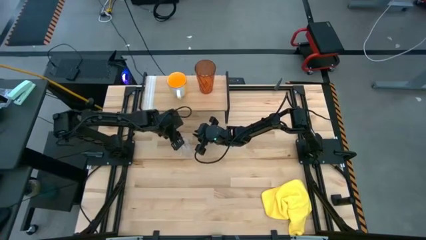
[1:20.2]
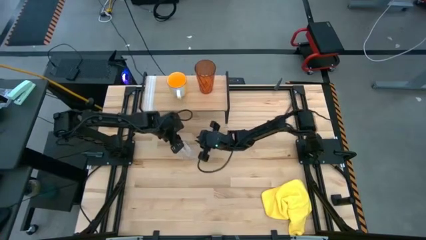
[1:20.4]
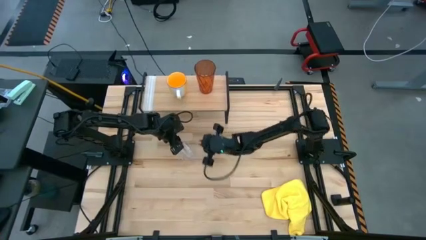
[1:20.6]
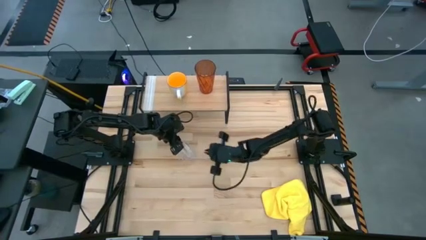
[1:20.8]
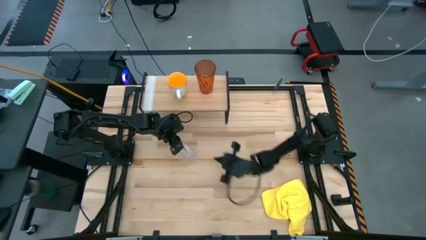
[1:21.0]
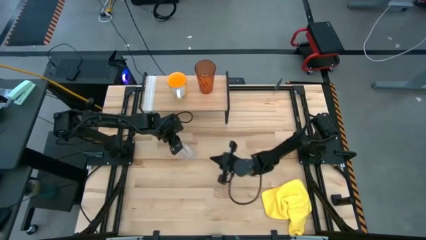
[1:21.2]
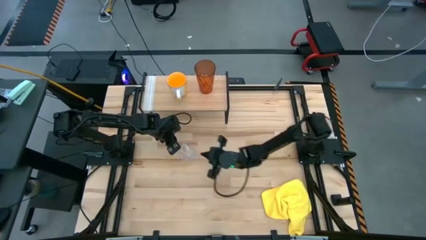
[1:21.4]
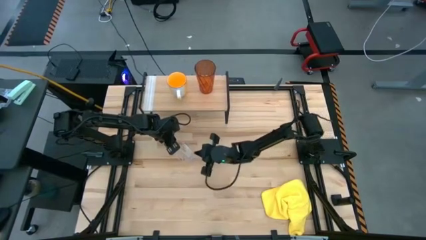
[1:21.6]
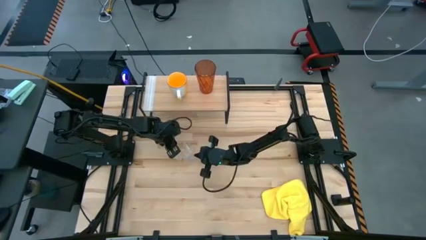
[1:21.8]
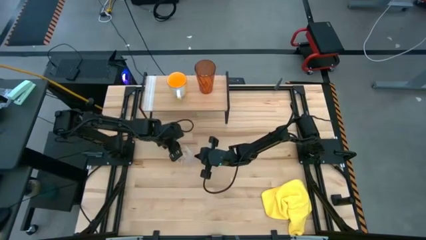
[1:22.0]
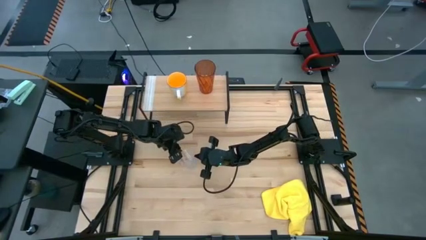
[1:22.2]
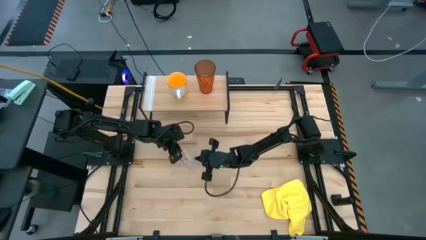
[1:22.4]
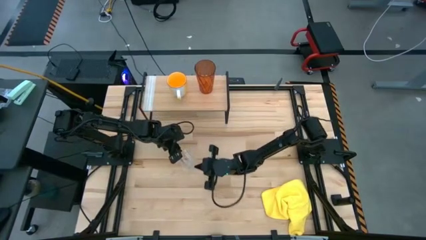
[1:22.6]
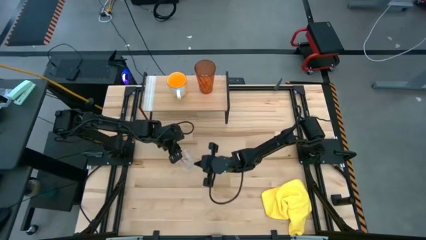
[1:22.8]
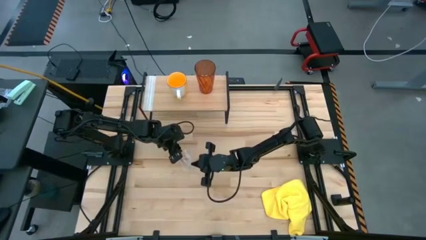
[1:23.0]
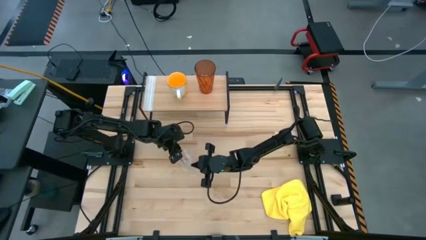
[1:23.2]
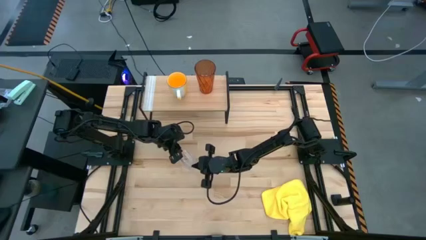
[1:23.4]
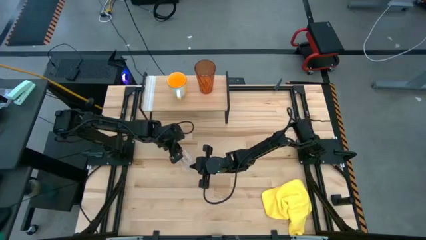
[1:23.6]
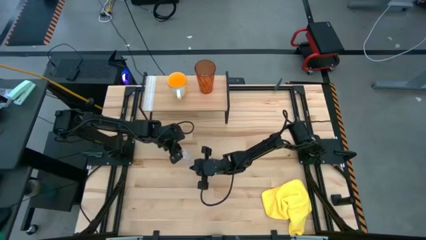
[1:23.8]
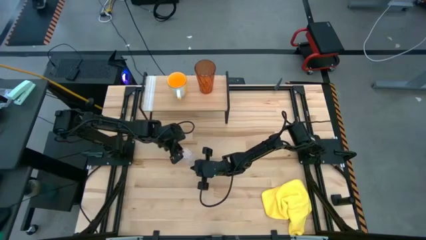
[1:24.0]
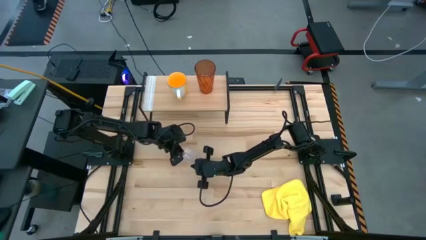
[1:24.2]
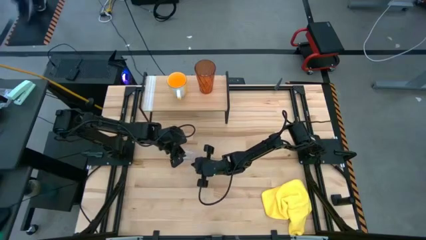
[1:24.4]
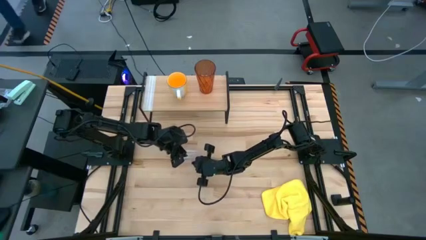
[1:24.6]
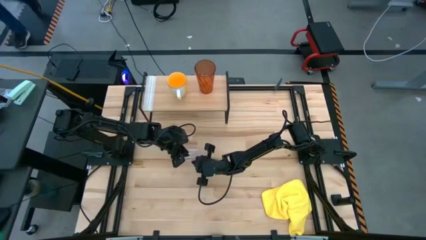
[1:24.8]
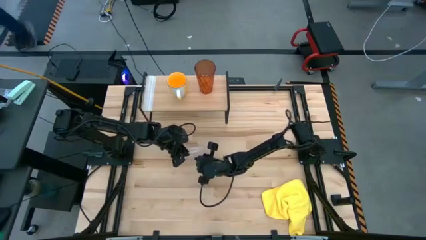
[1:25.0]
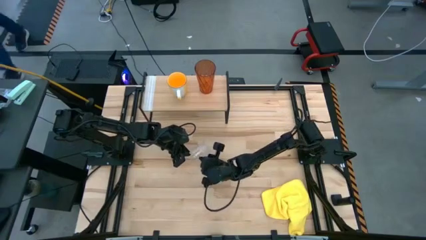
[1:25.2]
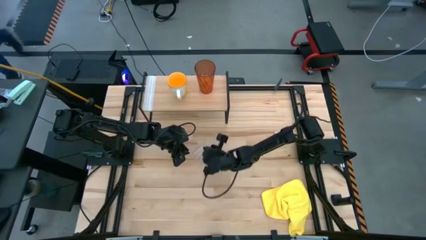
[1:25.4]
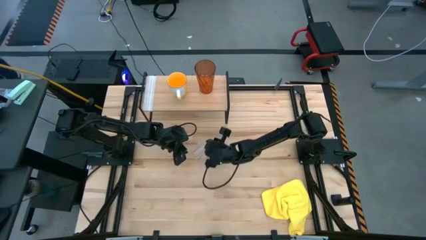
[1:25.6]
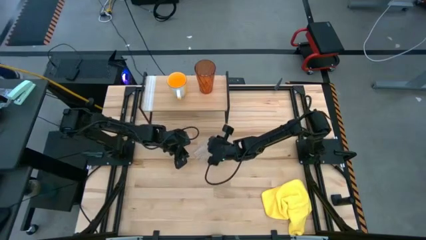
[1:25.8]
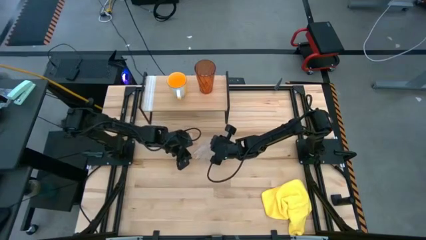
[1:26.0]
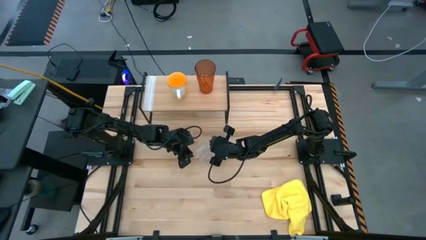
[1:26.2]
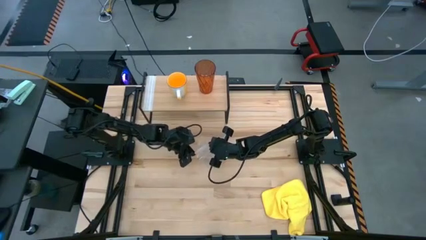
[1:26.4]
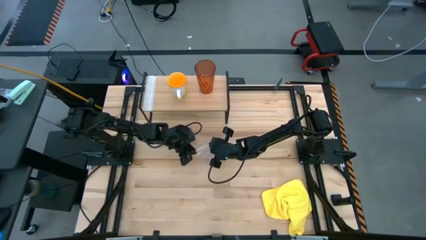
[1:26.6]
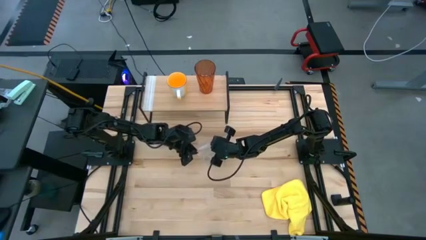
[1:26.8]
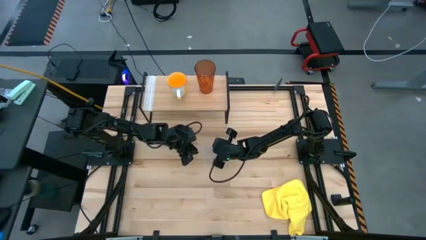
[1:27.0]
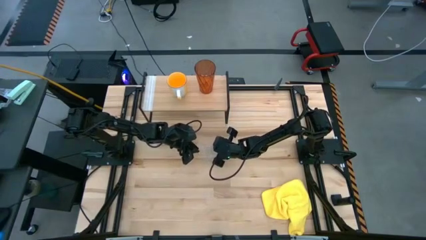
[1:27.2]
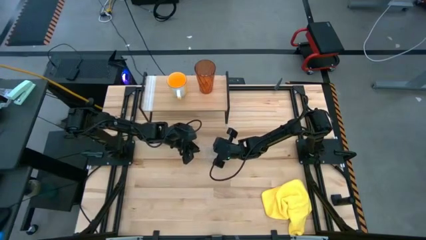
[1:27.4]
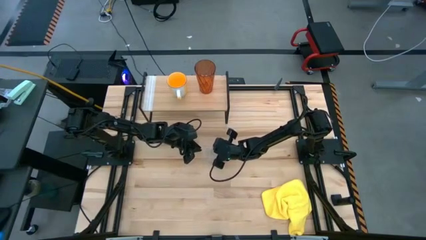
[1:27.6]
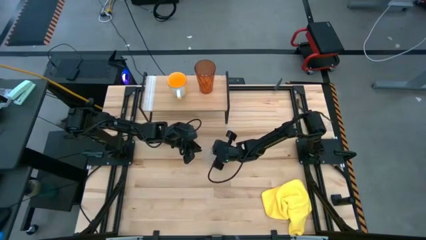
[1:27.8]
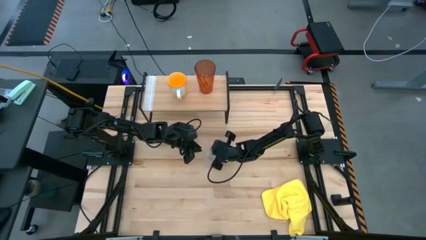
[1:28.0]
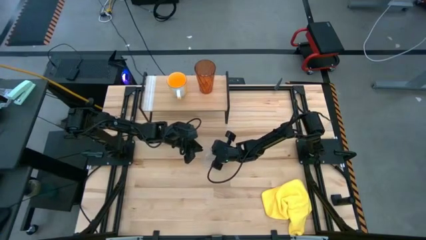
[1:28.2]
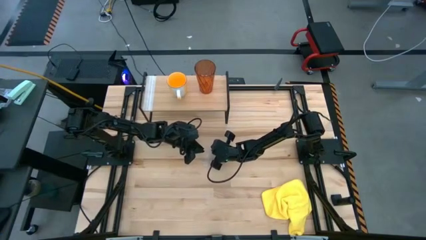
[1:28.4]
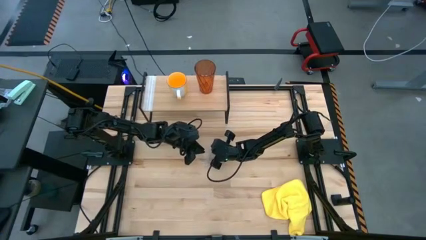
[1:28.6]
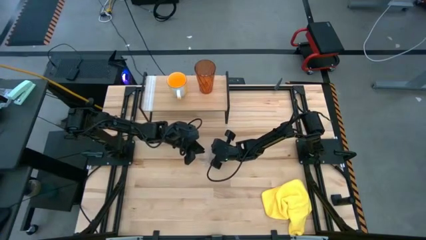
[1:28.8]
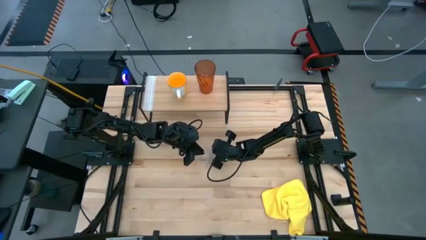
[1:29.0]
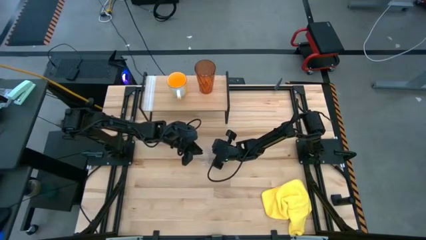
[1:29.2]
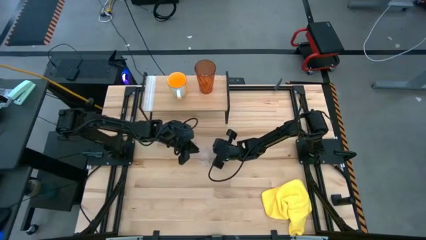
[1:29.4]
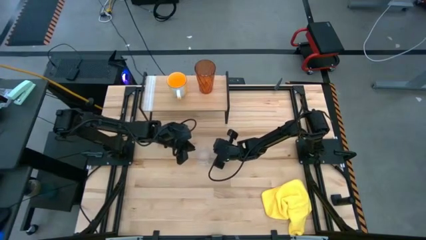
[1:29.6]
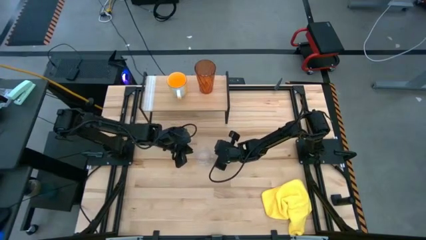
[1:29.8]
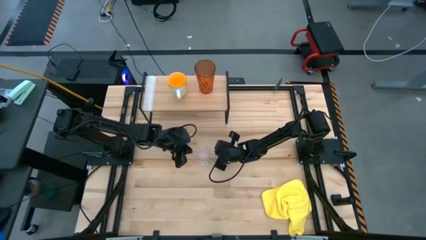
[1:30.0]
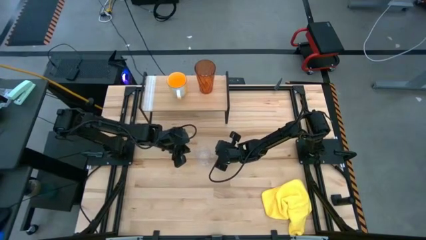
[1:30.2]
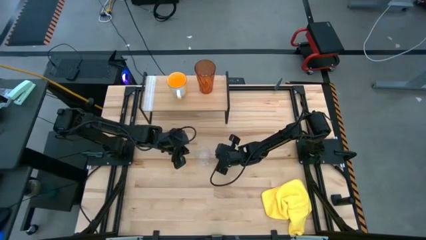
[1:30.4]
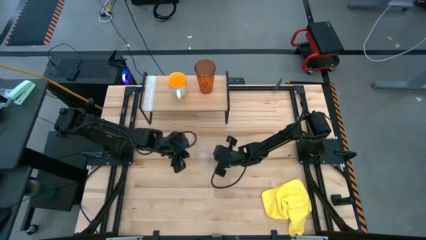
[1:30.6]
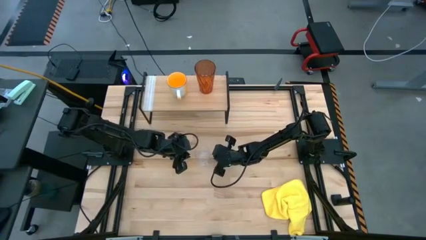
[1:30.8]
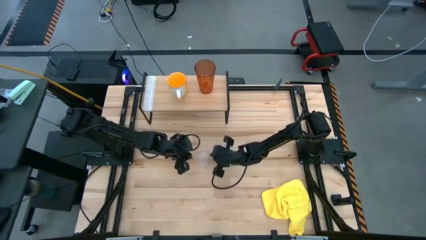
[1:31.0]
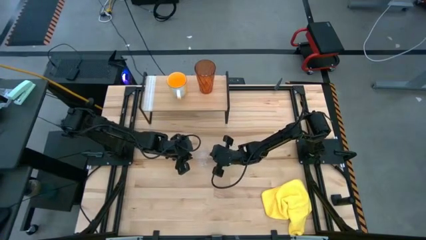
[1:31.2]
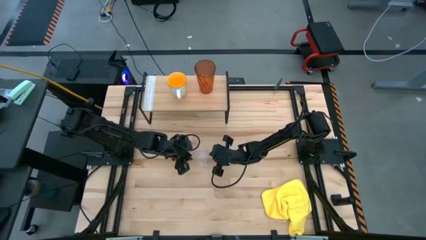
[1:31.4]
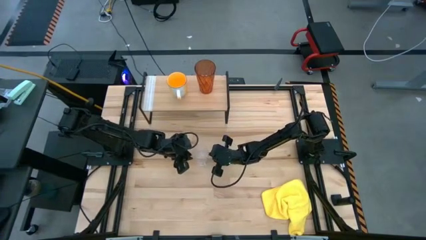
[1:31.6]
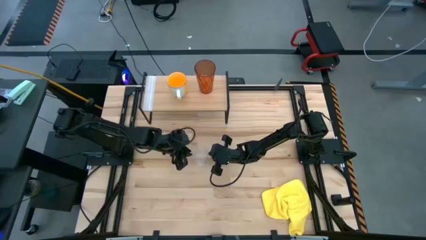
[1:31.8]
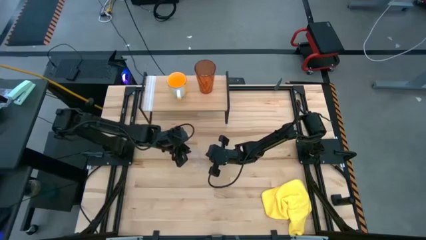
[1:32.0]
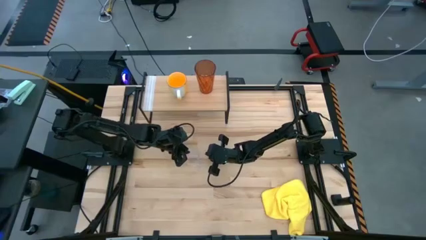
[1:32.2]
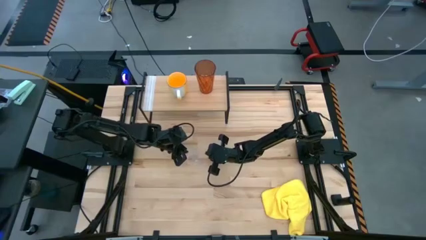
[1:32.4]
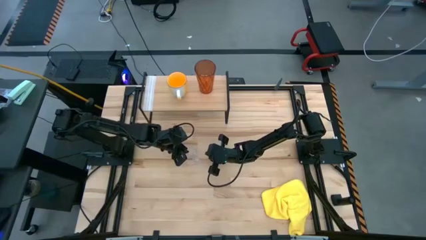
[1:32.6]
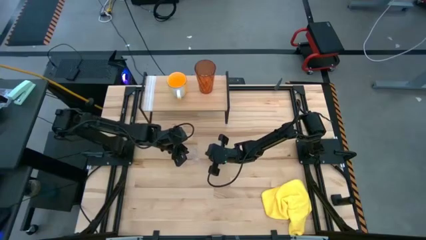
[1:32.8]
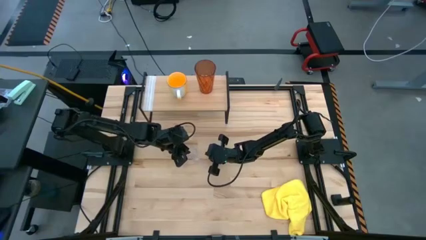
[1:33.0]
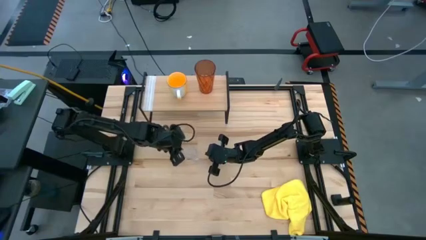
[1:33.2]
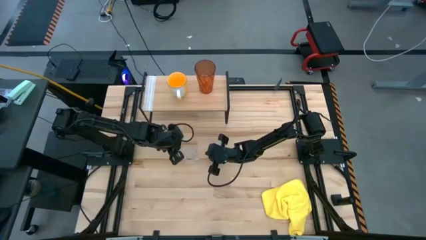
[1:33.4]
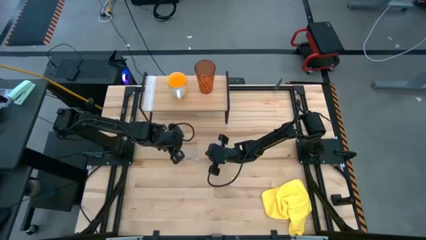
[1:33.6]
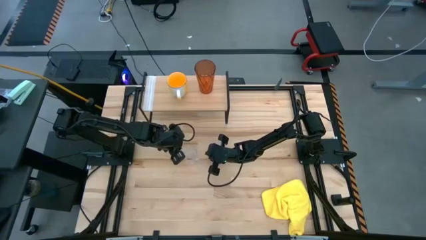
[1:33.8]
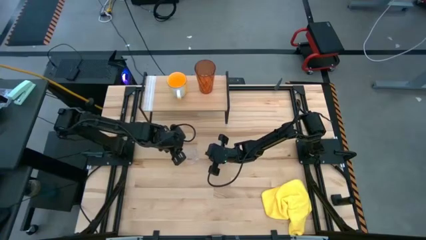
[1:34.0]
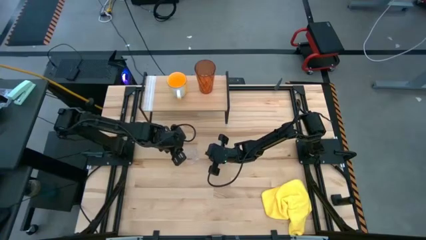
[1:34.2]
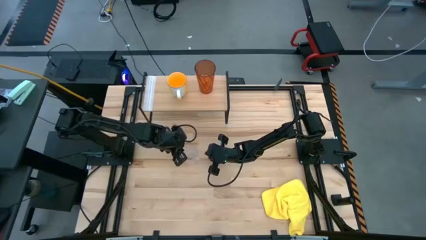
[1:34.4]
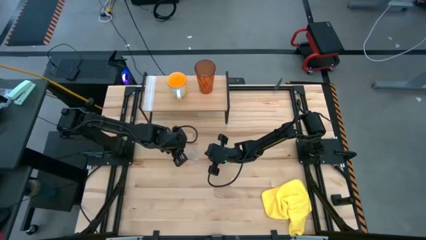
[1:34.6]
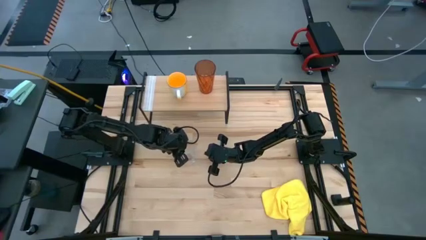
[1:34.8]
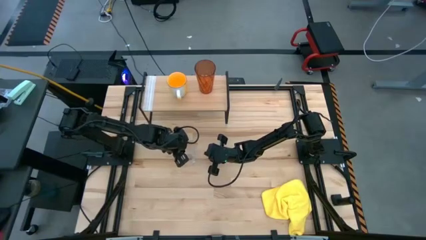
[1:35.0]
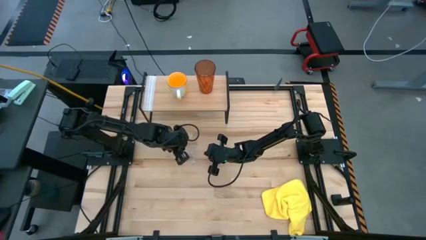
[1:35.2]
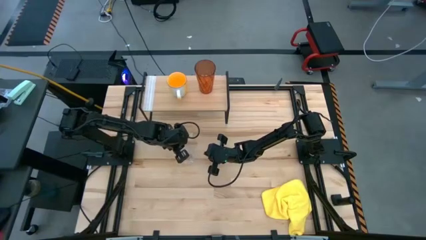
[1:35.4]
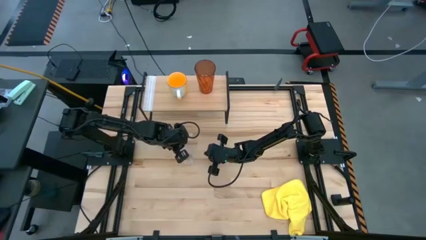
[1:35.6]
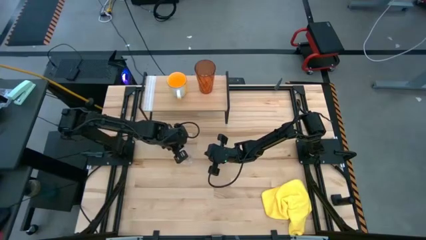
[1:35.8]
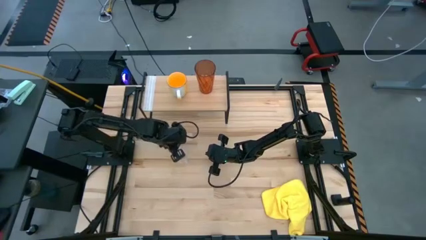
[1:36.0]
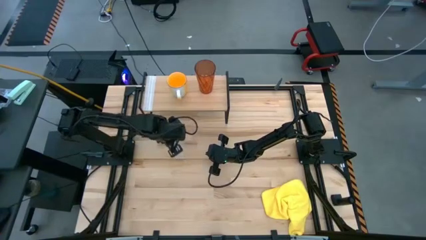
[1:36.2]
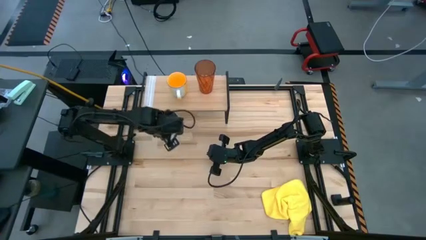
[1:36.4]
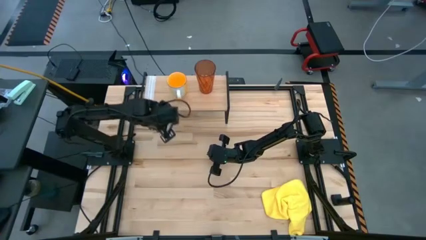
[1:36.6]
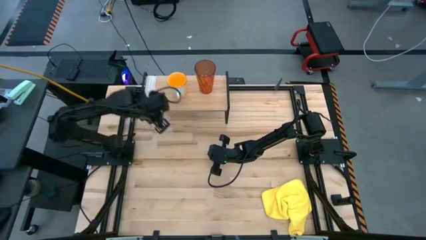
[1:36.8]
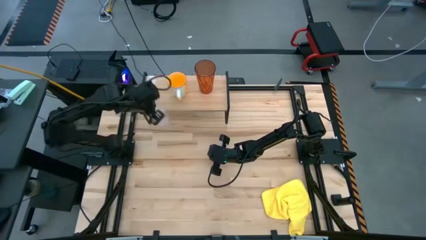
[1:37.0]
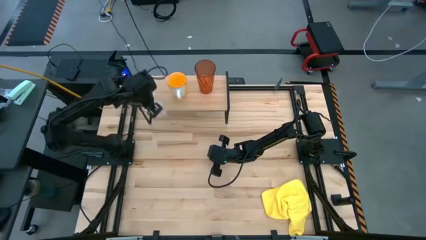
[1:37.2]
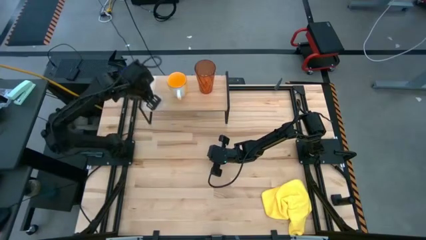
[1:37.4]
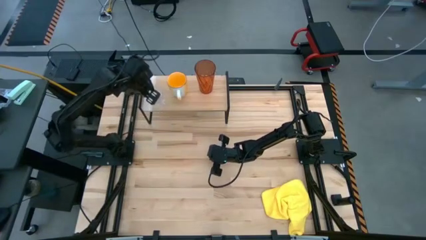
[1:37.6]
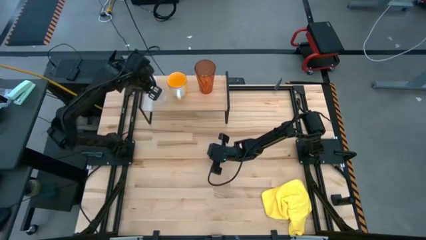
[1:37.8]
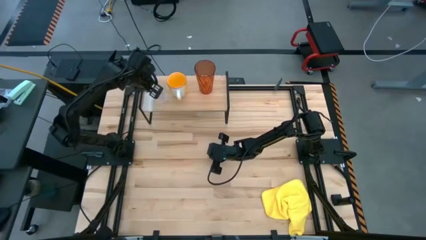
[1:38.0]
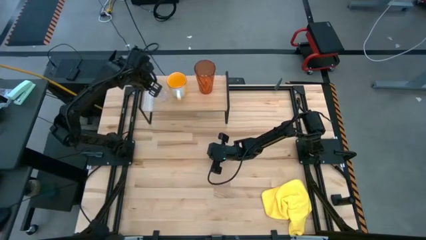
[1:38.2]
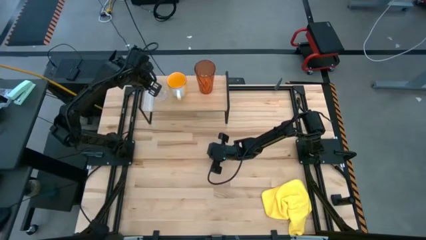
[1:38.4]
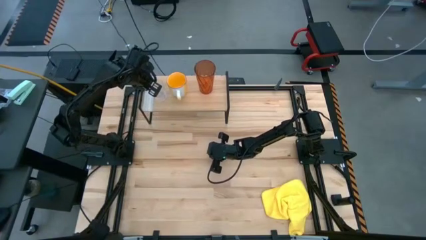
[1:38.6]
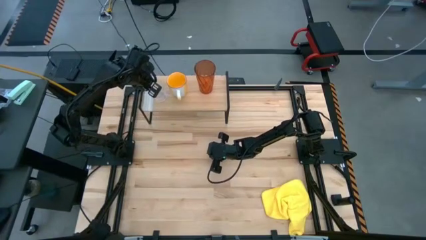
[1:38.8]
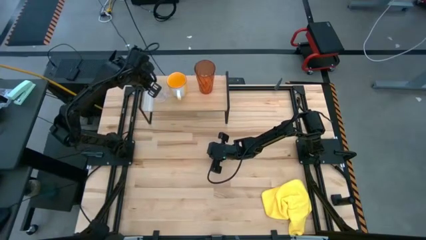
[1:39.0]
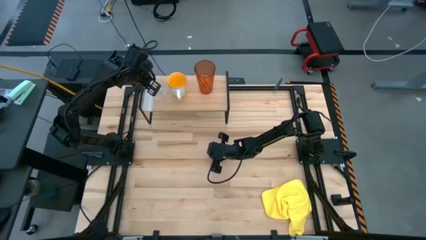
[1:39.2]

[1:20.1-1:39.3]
Task: Stack small to large cups/mugs on shelf
Put the transparent mug on the shelf
